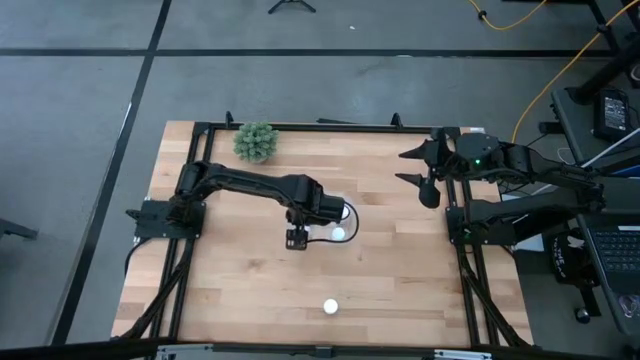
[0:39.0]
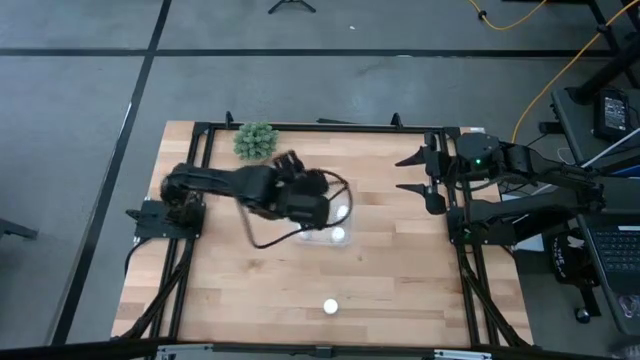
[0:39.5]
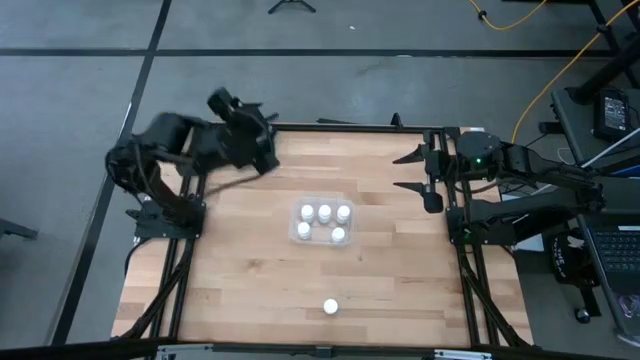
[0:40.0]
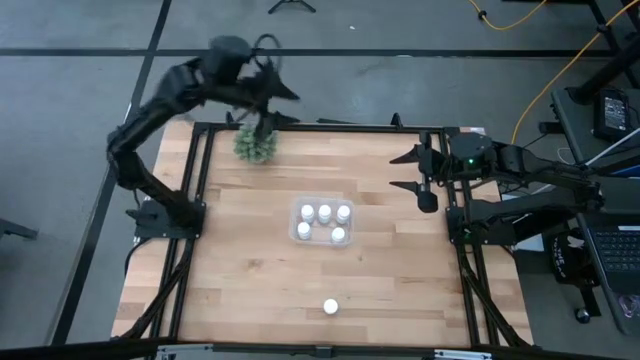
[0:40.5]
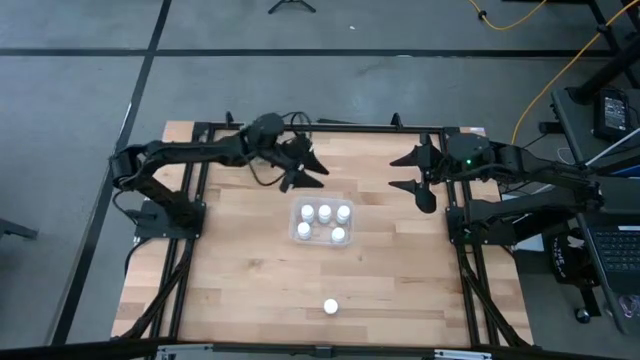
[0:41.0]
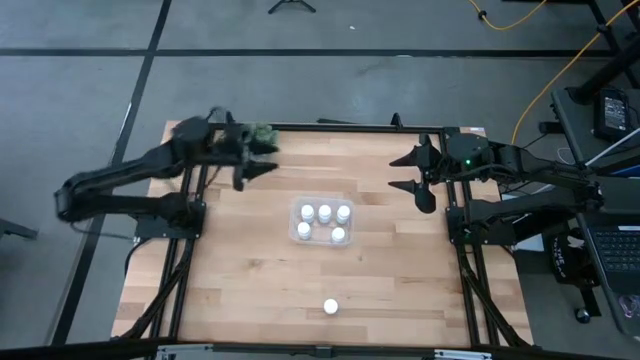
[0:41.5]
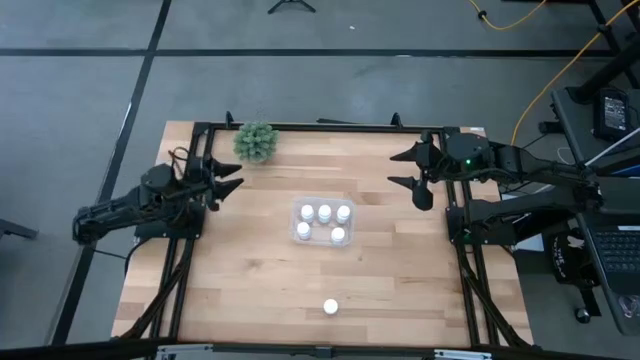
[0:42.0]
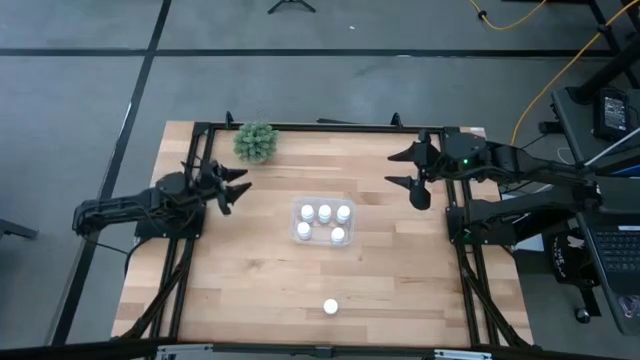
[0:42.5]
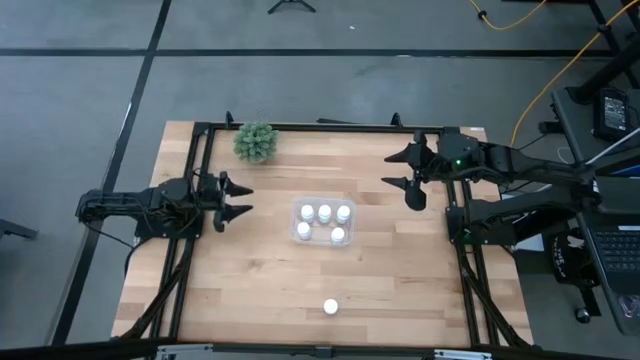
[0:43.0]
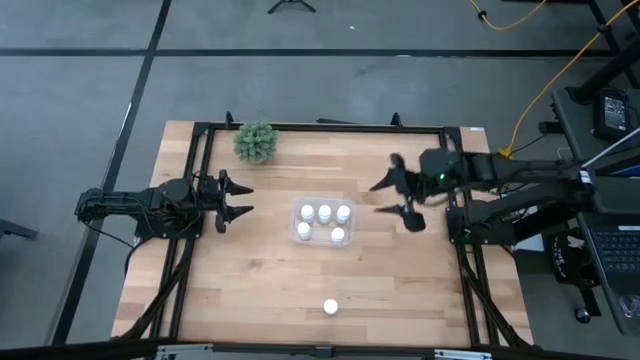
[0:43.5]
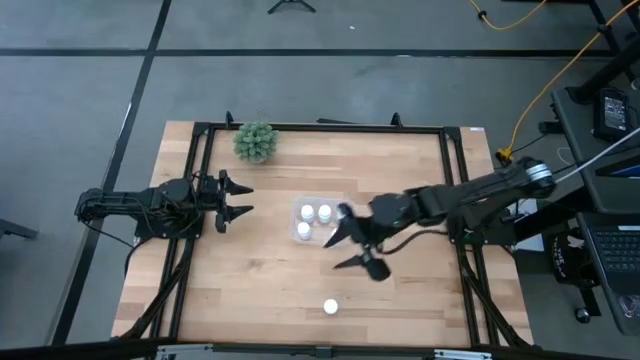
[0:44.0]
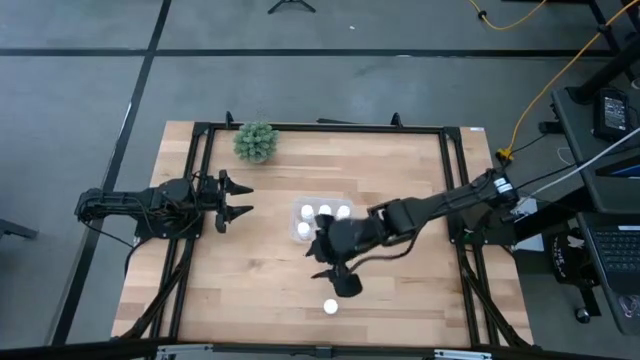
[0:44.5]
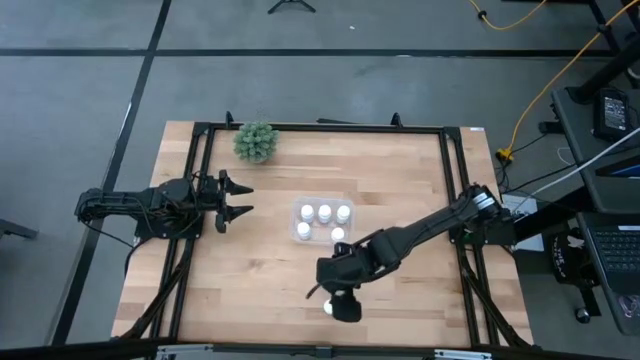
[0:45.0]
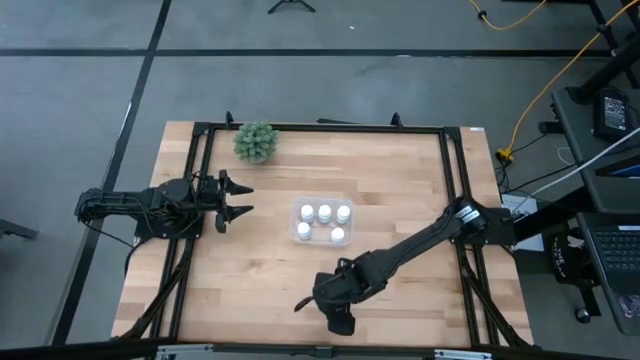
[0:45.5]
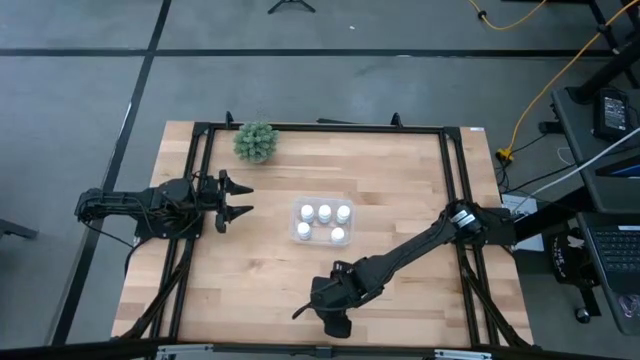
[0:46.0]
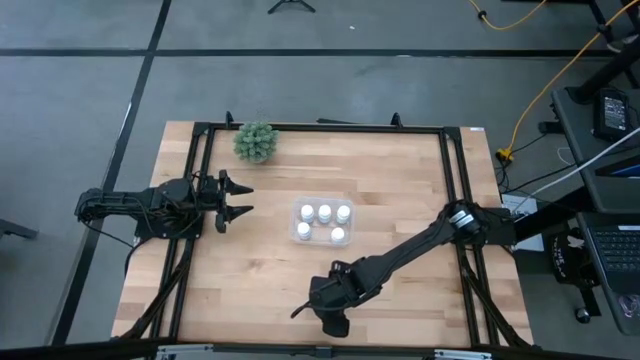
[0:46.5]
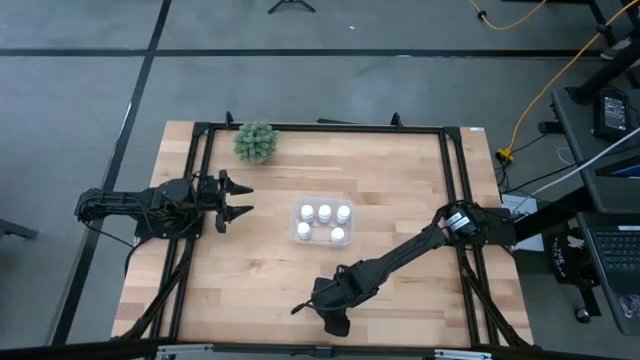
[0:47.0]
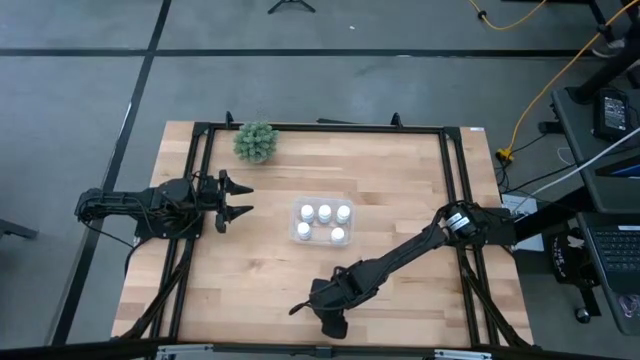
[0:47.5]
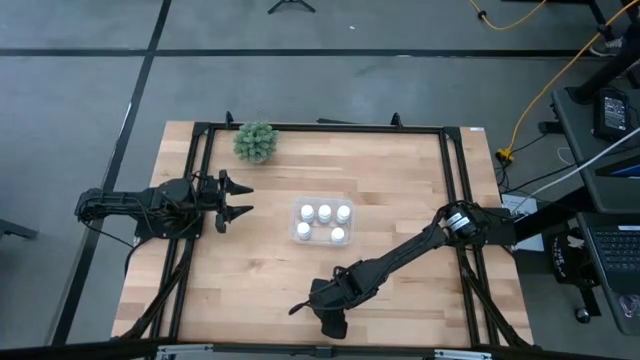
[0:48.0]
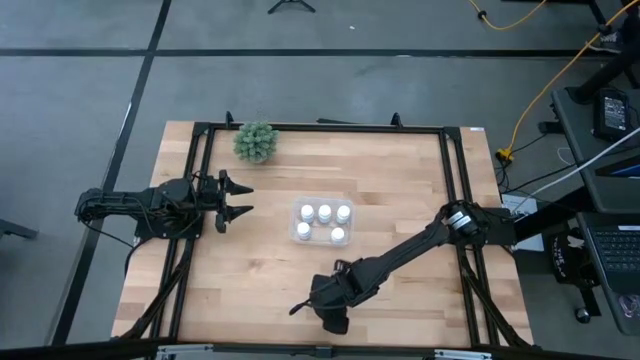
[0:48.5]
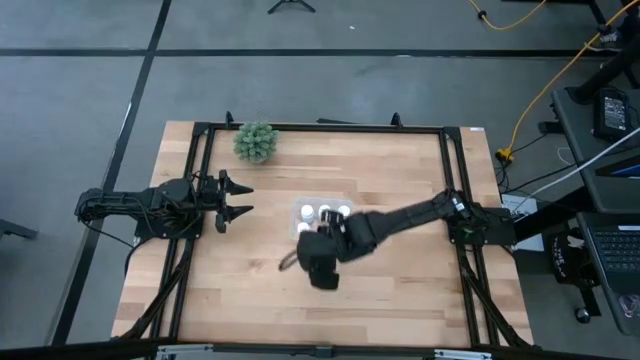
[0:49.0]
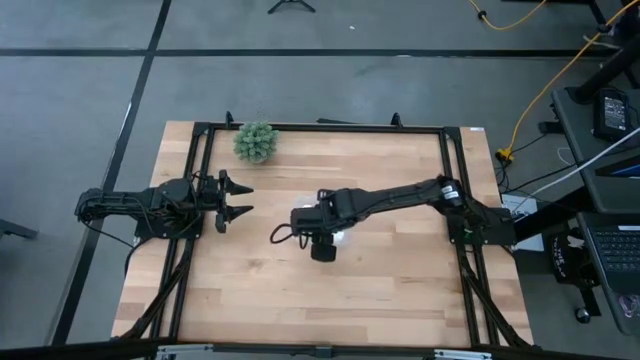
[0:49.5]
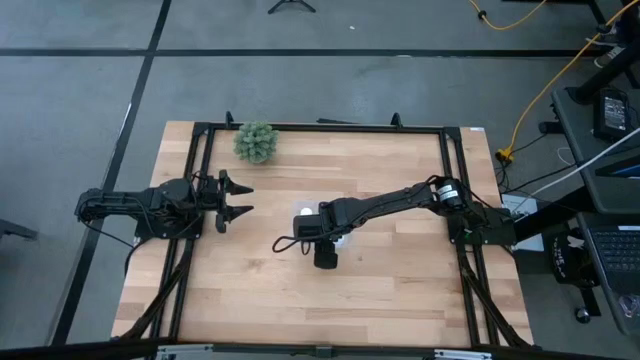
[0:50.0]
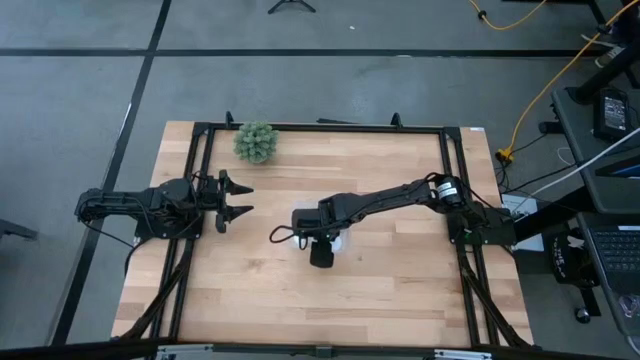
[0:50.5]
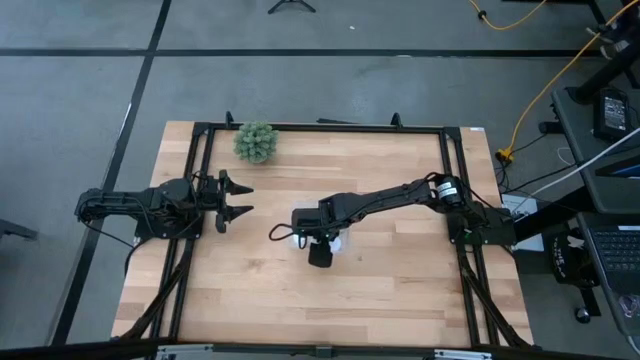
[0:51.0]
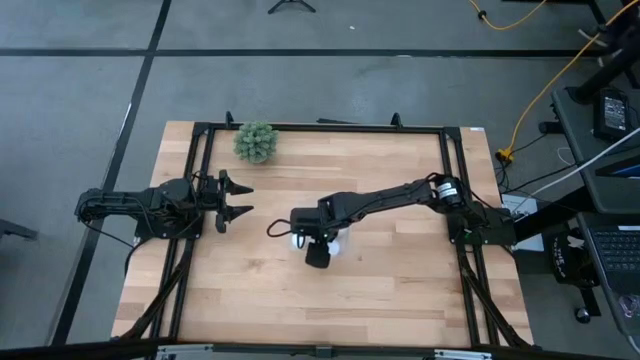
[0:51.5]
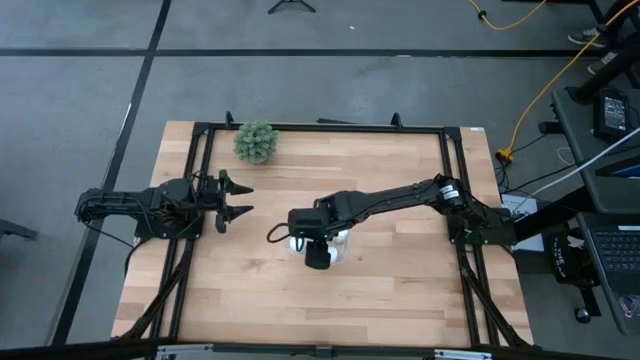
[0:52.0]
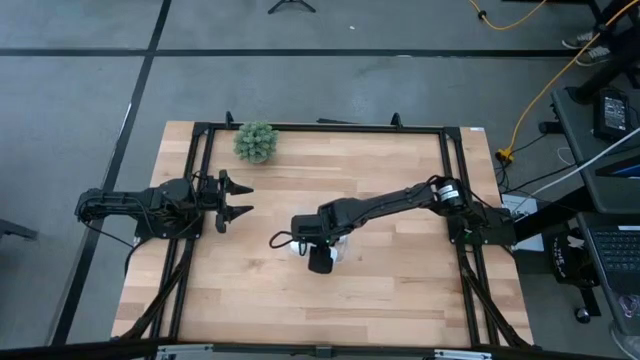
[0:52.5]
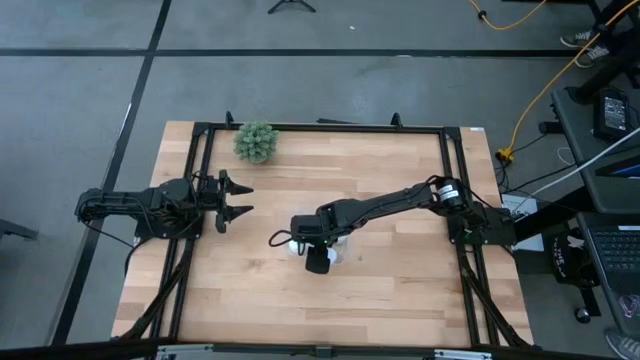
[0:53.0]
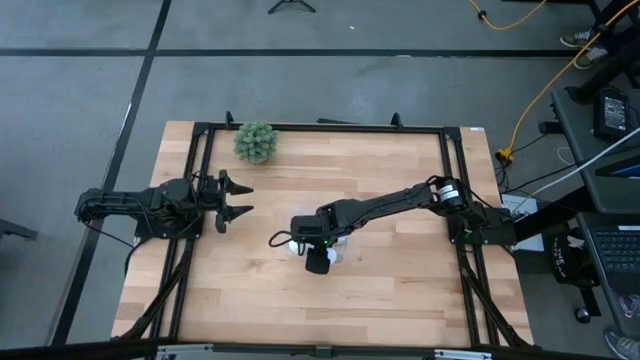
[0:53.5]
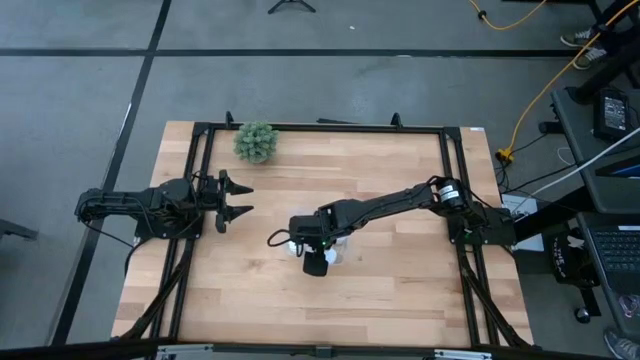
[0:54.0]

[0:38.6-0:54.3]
Task: Pick and place pill bottles into a basket
Put the white medicine bottle into the transparent bin

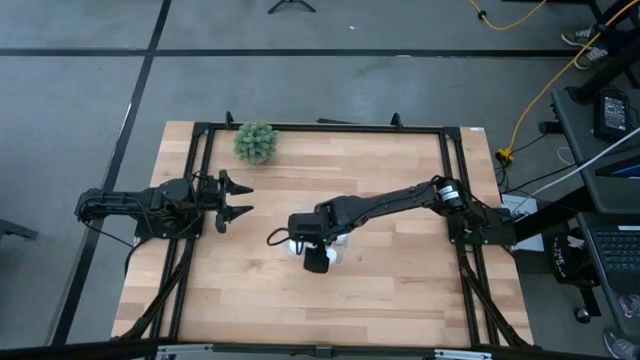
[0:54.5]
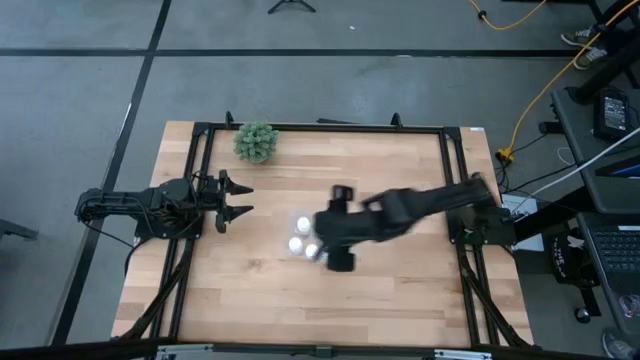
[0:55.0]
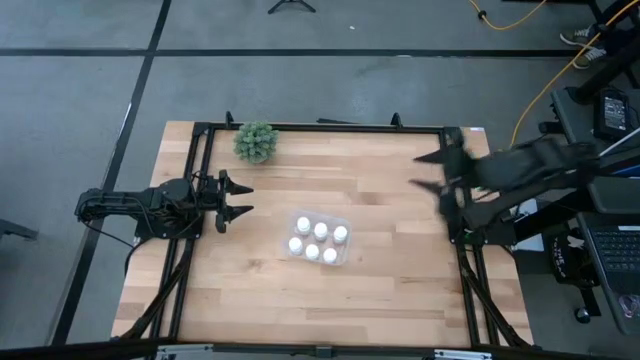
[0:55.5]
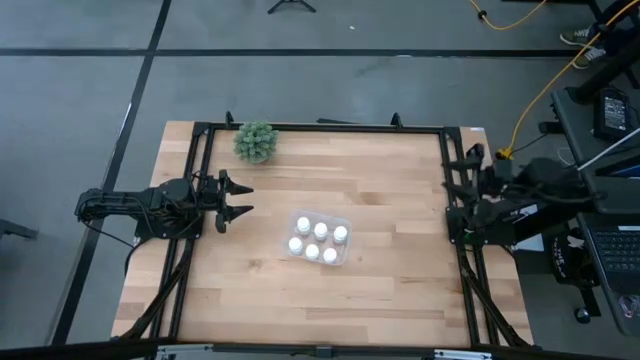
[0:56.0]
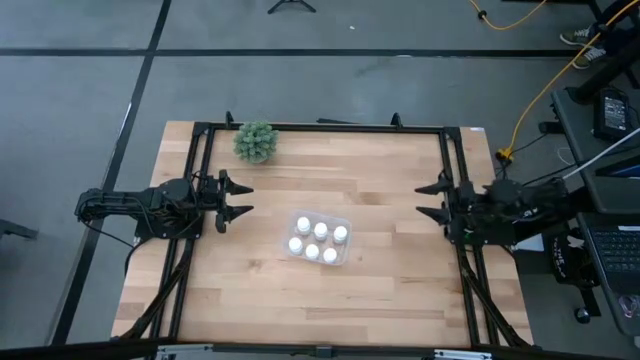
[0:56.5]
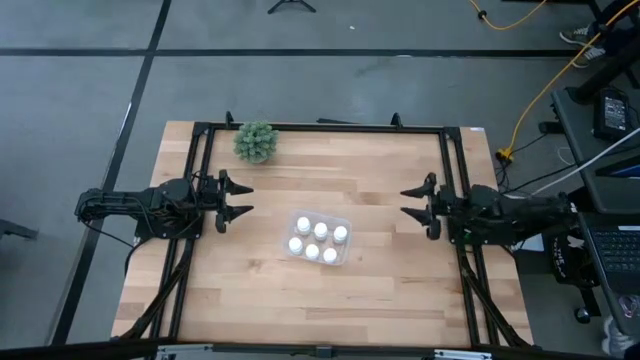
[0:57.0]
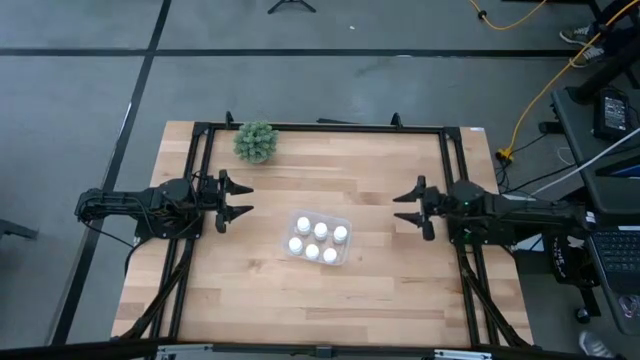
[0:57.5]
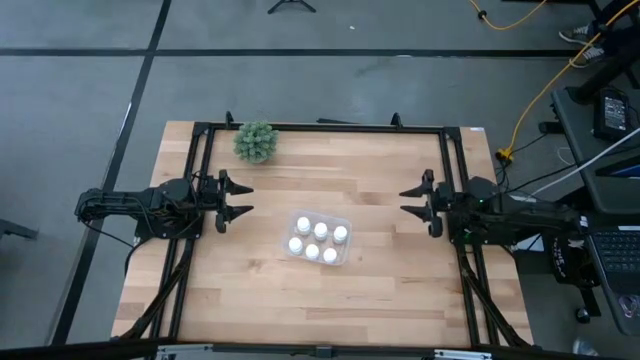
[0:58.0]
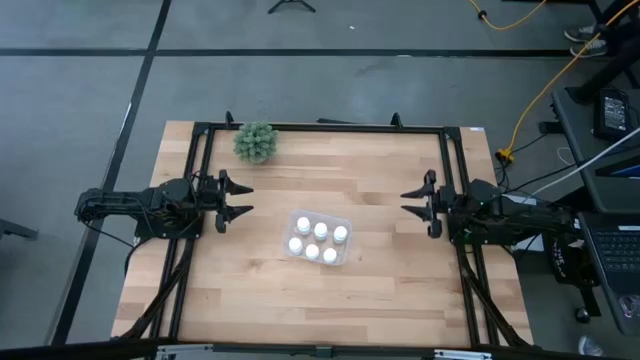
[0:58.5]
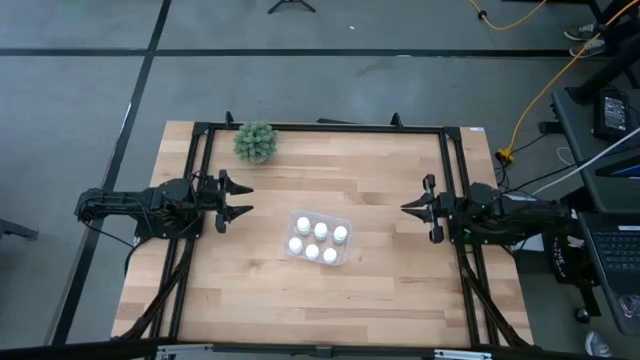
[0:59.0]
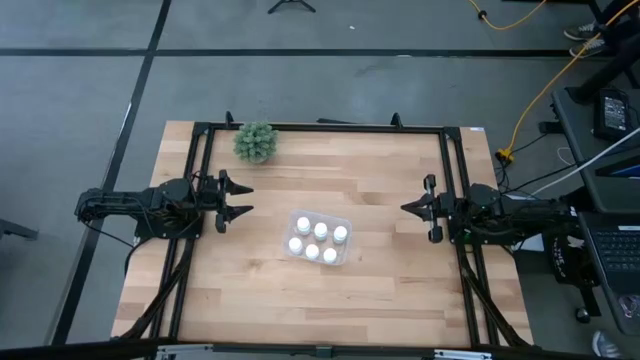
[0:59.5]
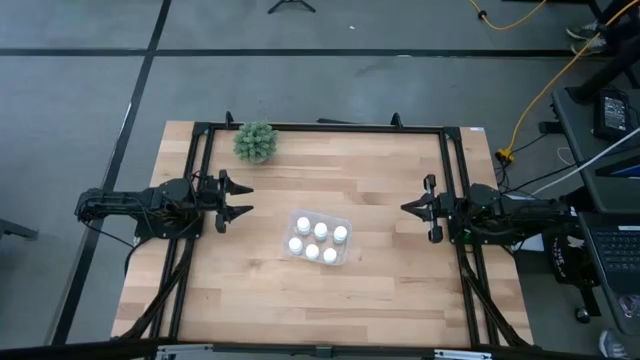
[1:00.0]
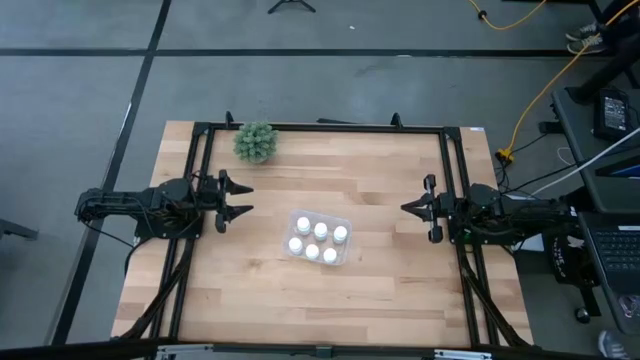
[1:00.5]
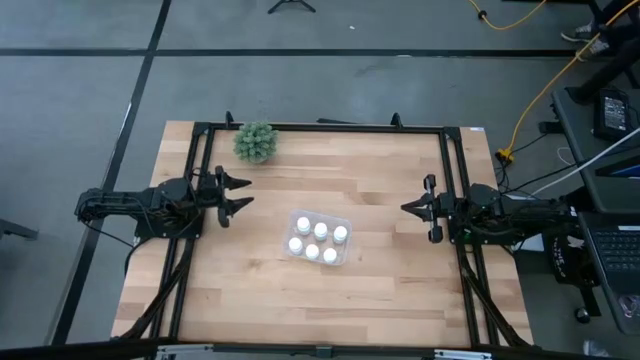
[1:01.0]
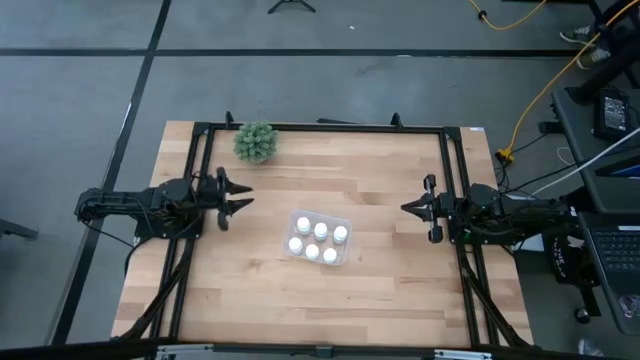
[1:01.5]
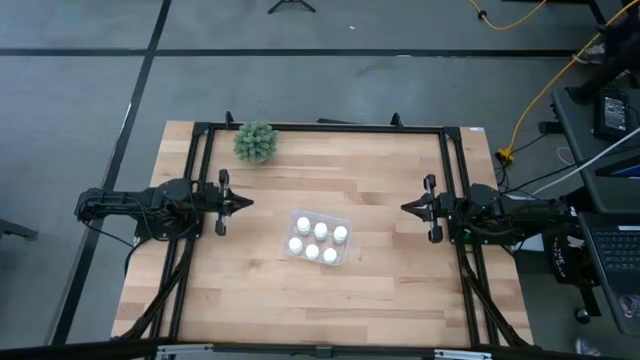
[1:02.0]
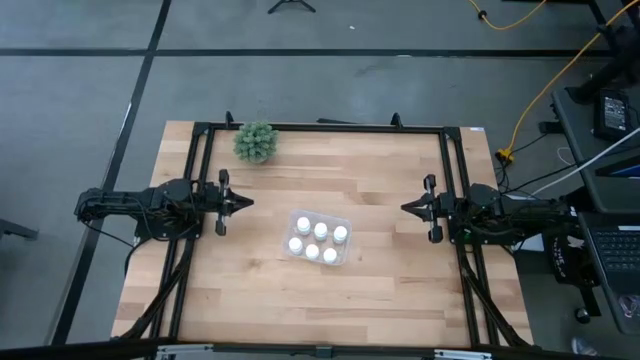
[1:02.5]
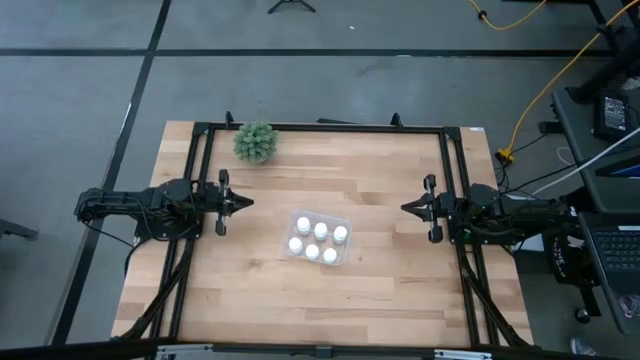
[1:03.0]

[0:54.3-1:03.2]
Return to Home Position
